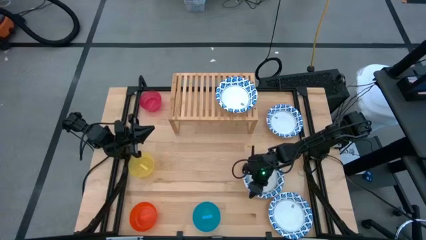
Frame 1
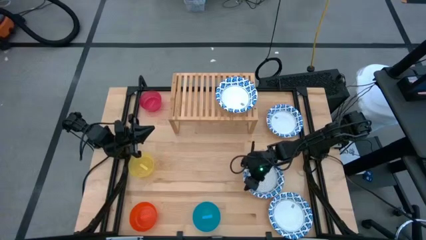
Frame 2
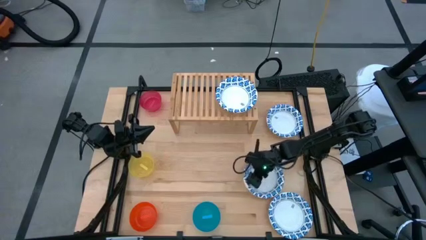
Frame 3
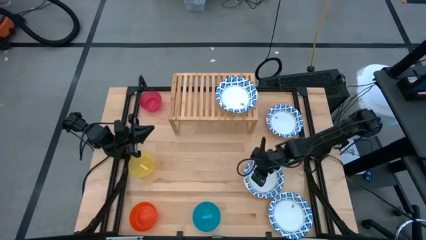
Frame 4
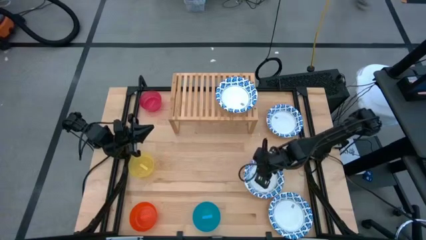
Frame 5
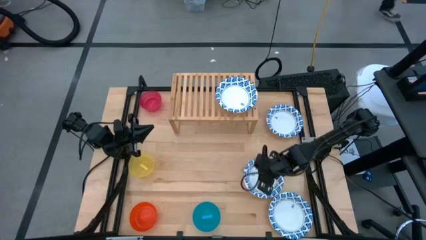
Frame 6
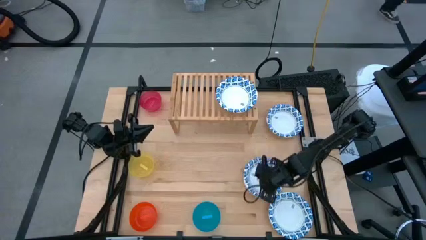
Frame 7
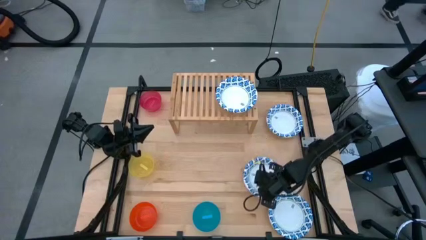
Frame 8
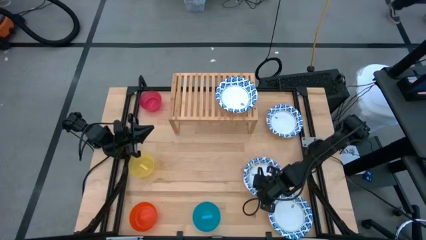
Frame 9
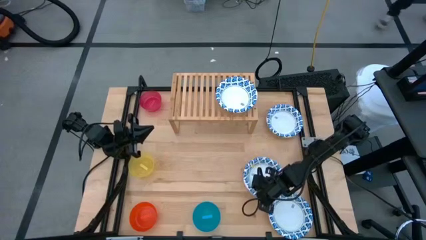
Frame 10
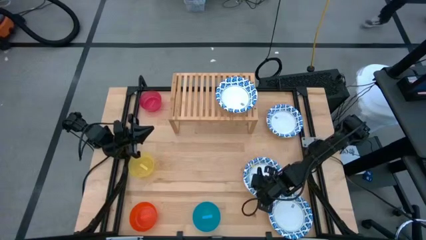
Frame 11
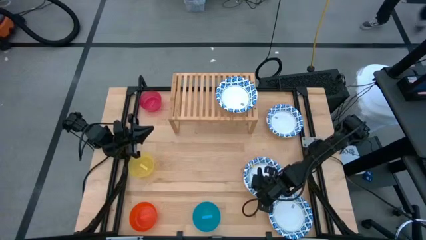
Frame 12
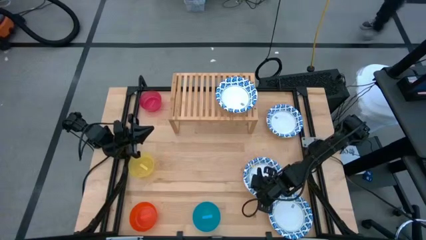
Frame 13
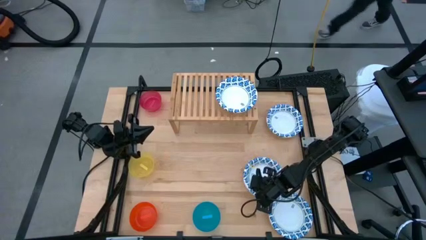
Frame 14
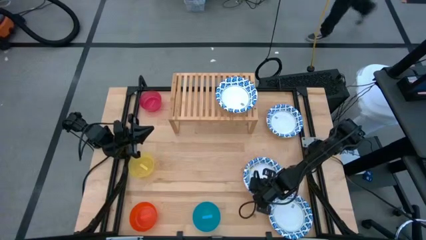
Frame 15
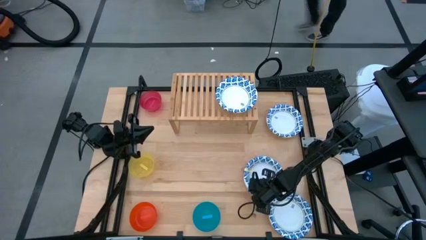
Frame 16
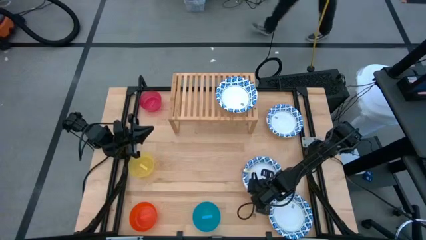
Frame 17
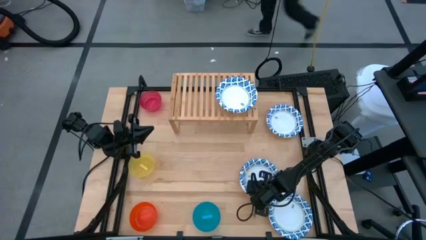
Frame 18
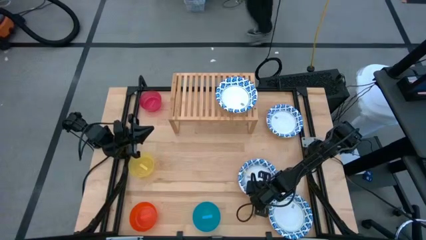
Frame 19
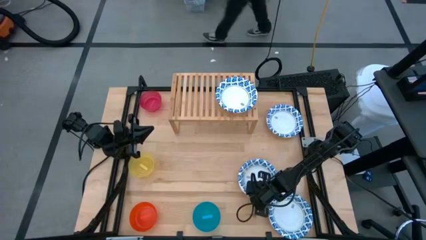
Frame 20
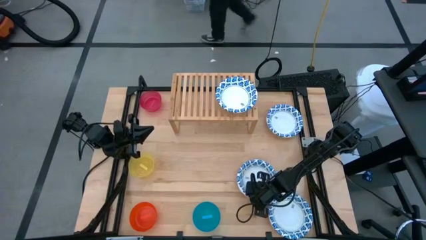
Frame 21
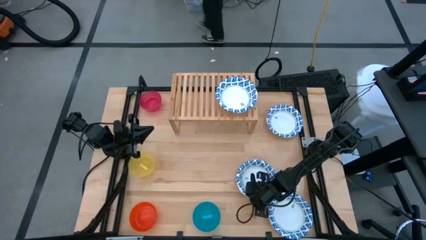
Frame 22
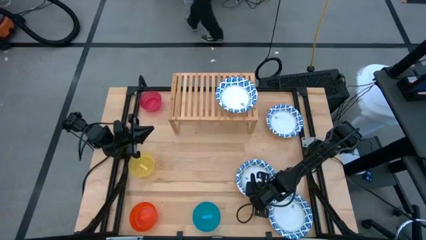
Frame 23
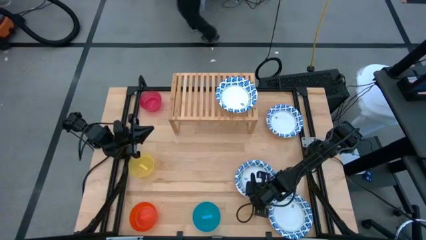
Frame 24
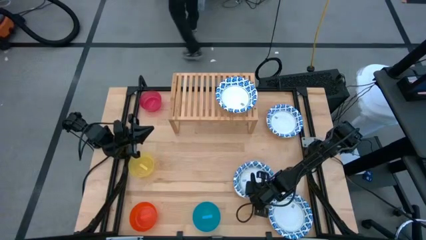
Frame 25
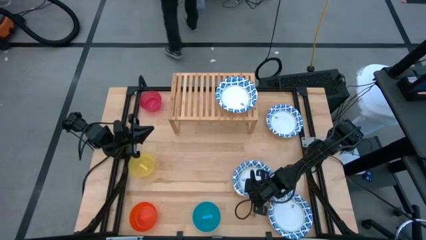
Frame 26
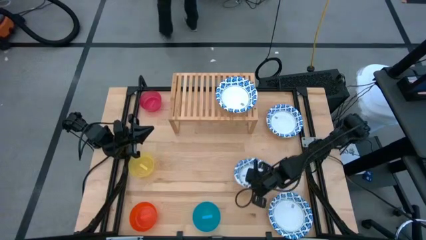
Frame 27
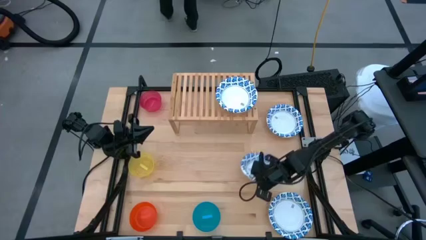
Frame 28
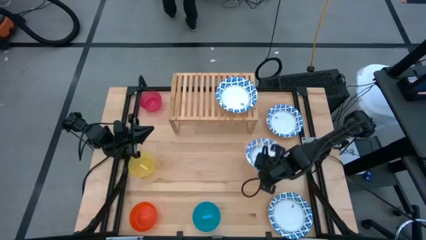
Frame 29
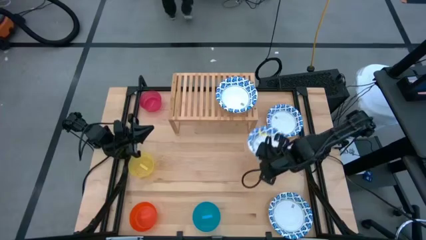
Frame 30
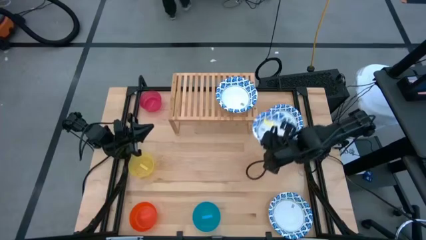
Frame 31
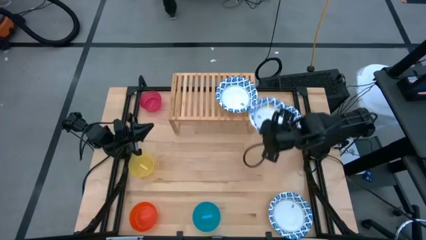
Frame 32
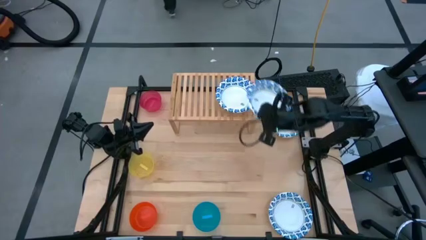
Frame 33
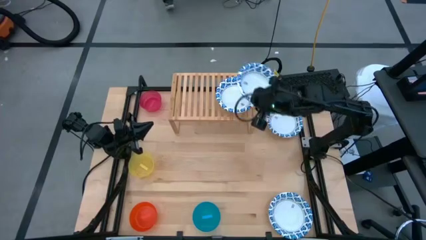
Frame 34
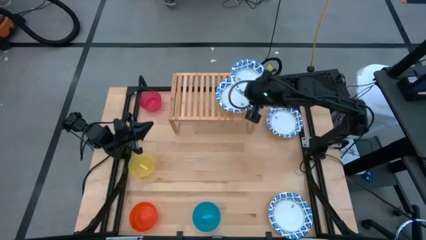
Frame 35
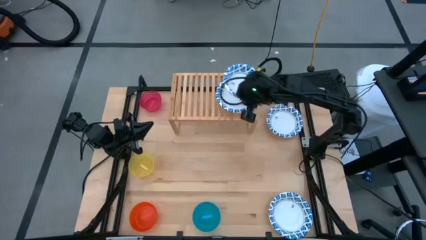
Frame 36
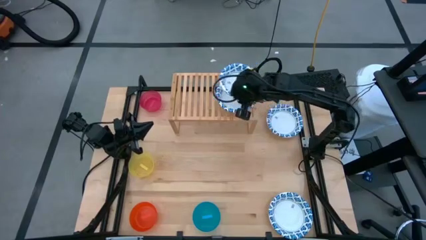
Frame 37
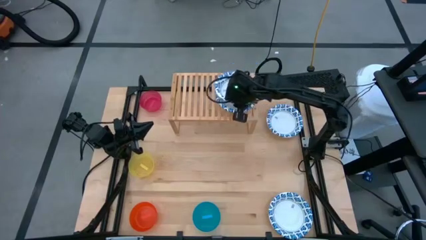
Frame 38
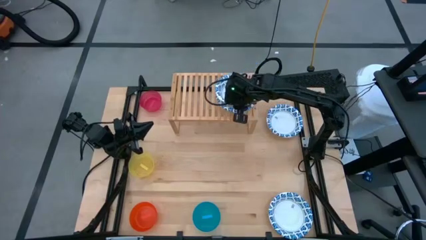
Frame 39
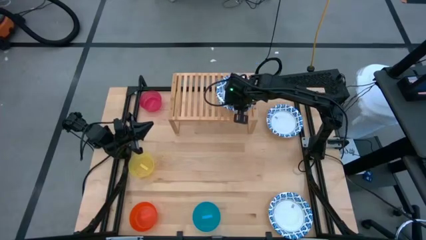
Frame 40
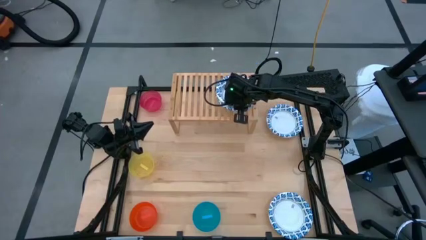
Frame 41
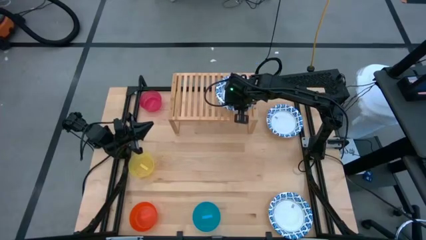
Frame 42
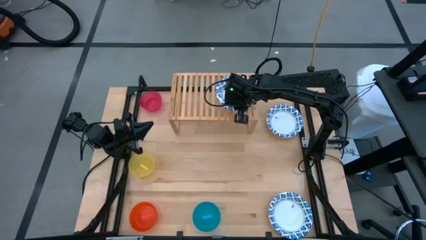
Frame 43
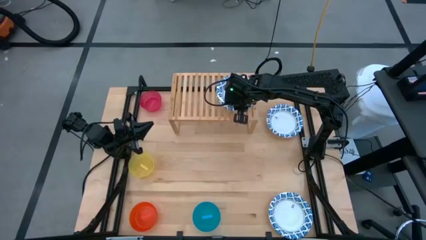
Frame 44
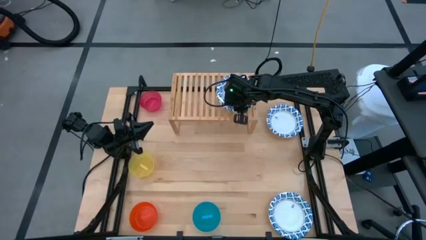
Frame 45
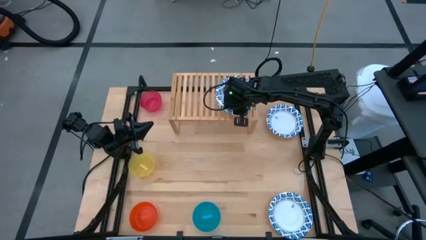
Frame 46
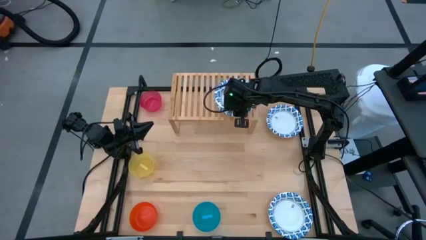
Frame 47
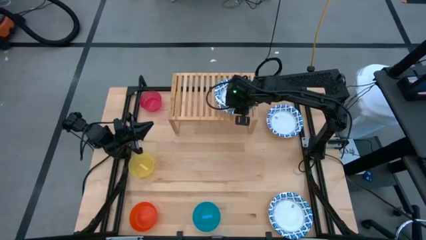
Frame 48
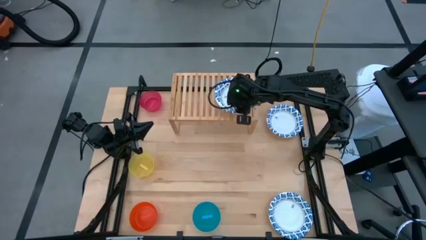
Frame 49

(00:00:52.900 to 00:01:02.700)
Task: Place and stack bowls onto a shelf
Stack the white bowl on top of the white bowl on the shelf

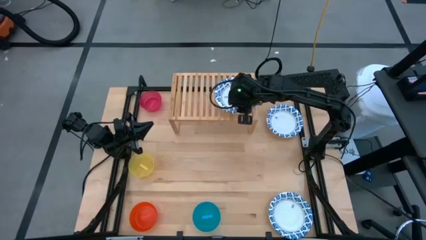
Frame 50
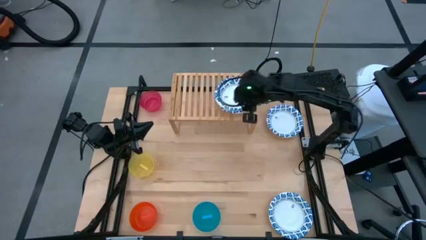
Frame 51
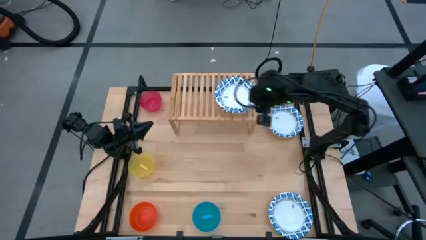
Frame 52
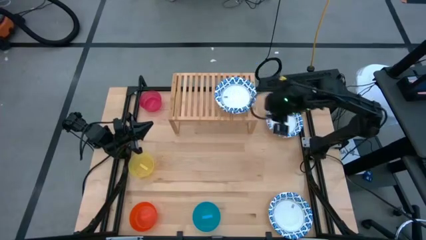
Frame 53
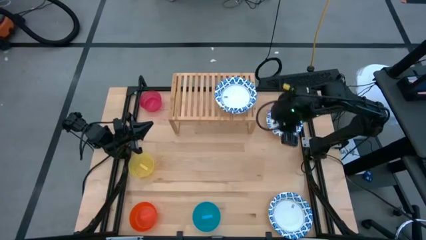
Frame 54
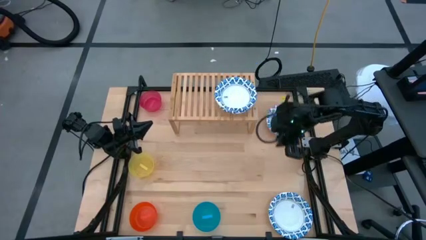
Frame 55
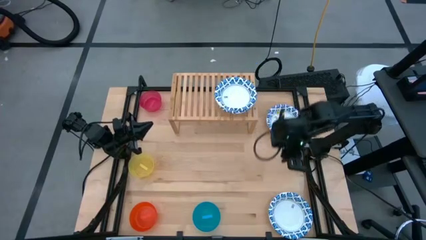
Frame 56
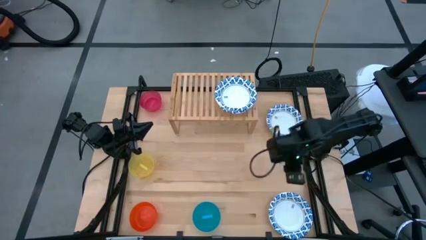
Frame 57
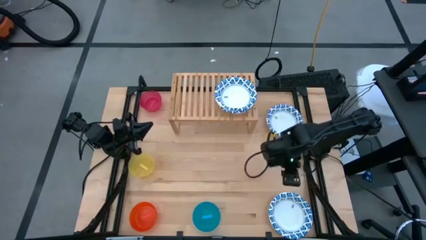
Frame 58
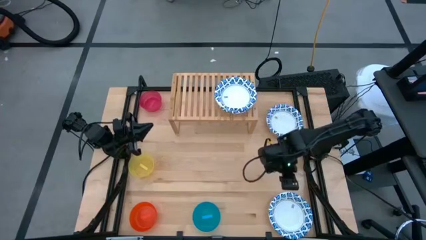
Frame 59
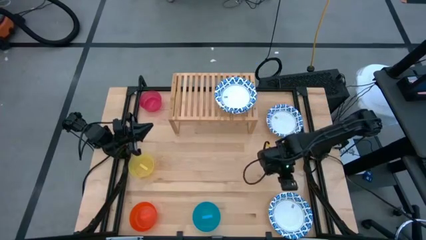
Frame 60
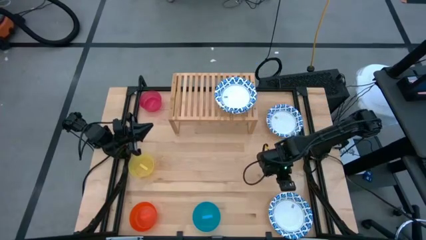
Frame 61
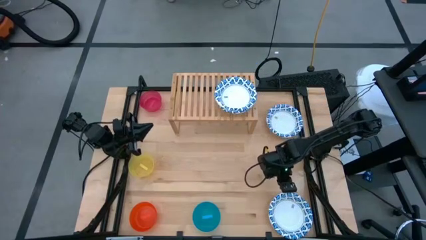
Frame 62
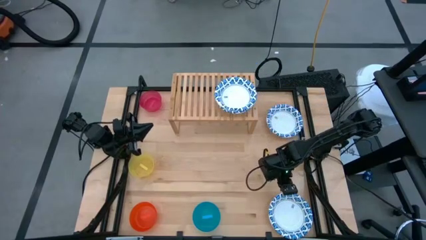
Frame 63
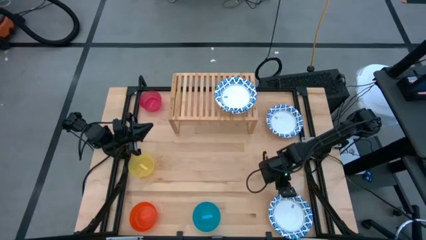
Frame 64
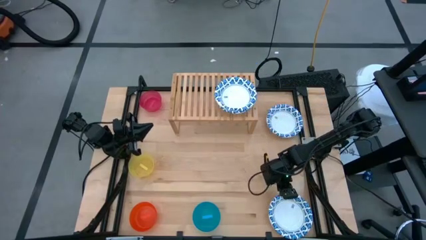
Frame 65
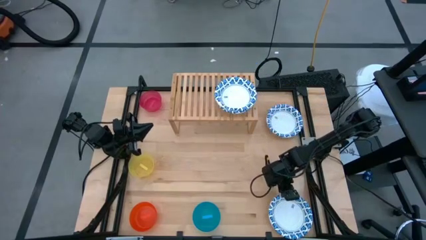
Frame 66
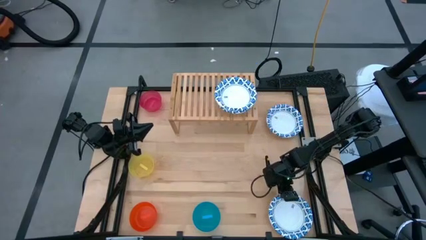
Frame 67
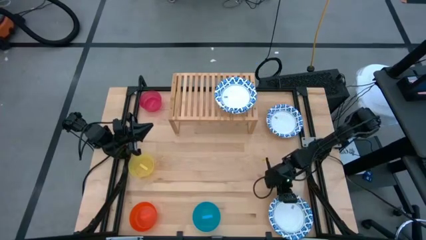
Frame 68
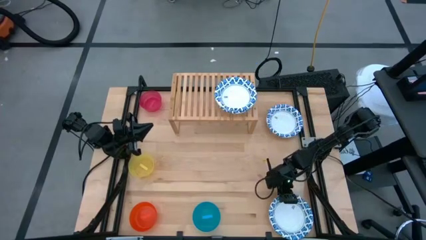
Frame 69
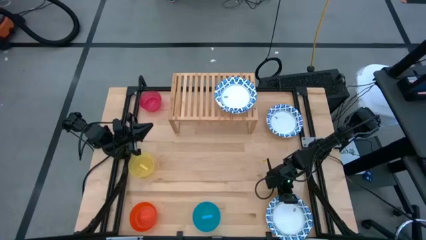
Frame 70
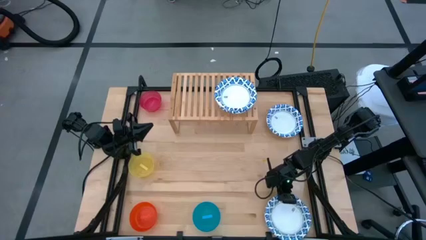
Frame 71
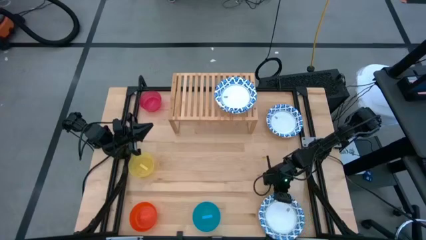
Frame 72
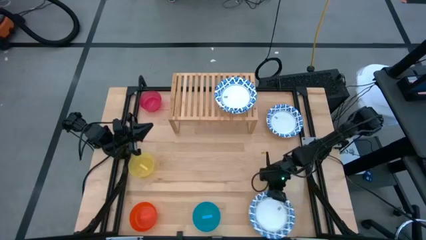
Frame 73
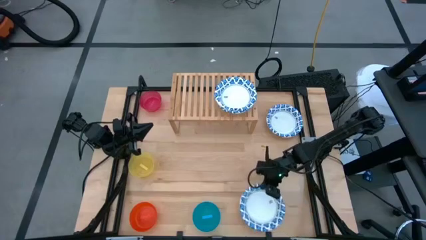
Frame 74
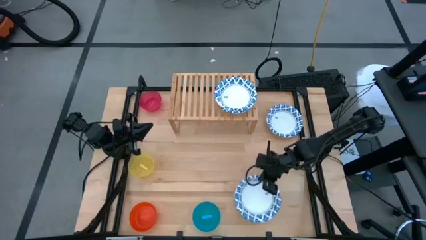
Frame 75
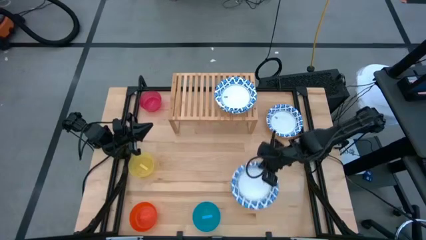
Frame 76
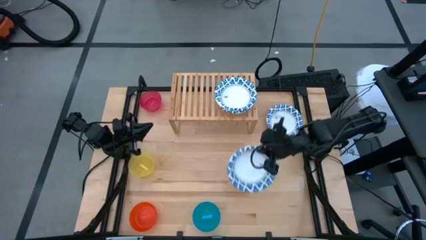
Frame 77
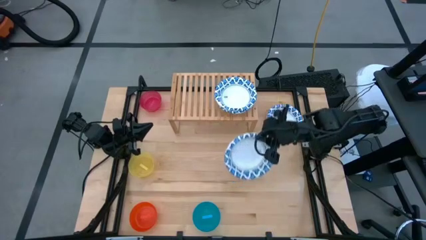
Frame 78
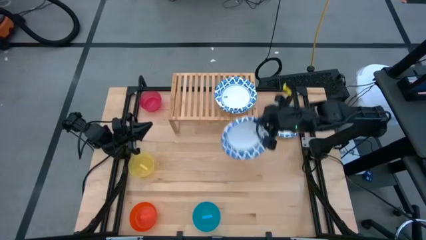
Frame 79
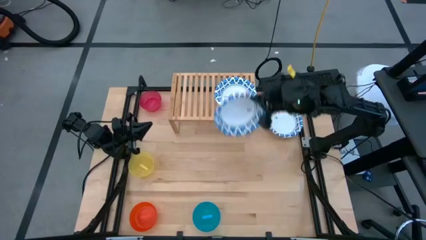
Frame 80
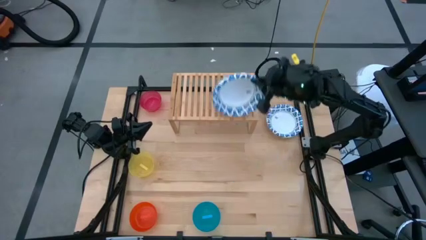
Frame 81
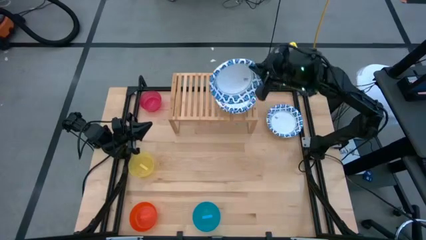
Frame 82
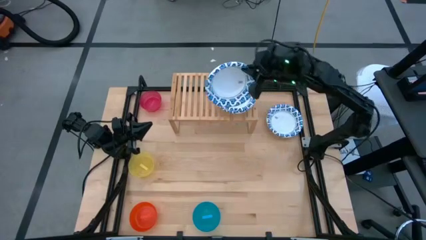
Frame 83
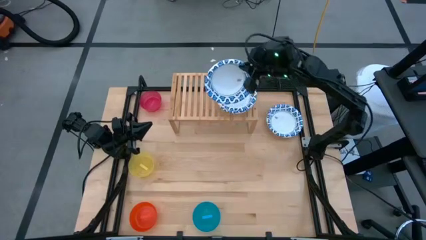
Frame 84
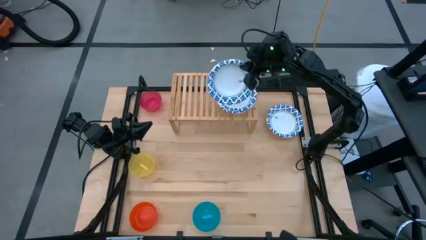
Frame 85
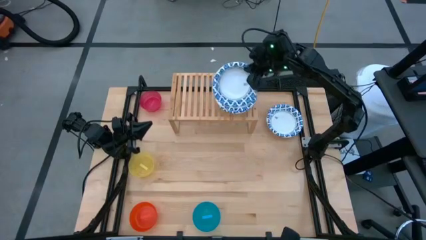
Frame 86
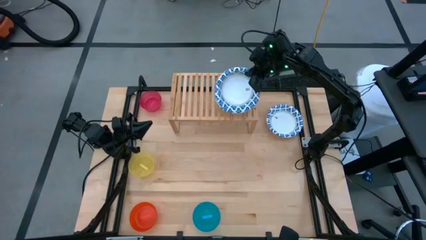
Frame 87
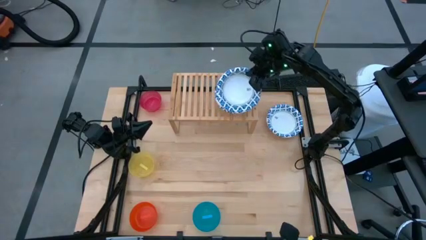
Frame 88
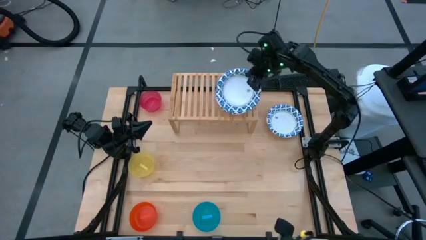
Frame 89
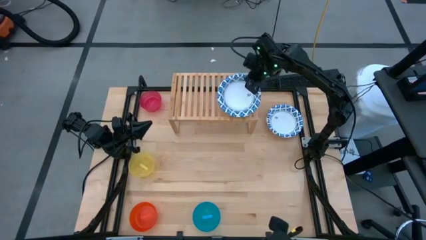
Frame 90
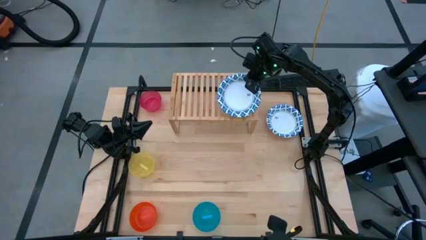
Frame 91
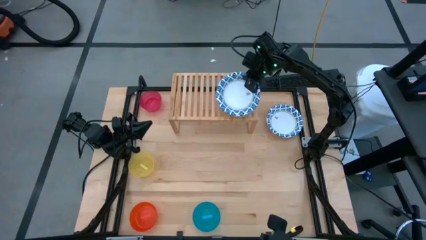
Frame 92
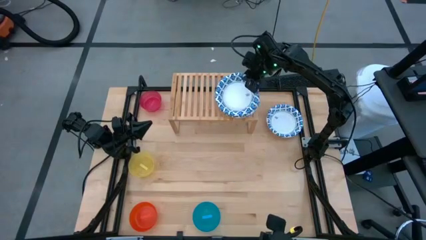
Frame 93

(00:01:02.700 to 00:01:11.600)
Stack the white bowl on top of the white bowl on the shelf
